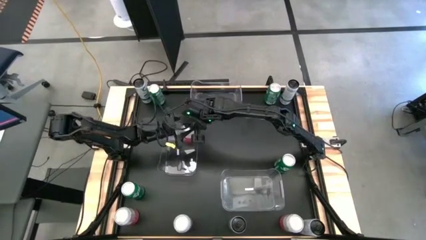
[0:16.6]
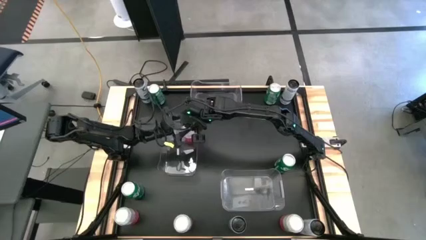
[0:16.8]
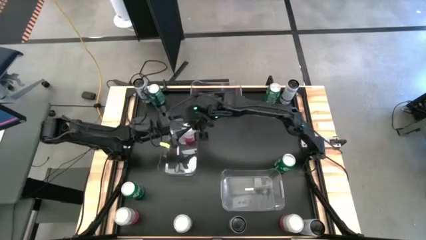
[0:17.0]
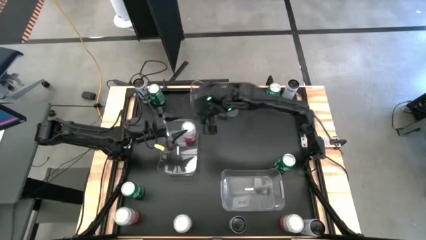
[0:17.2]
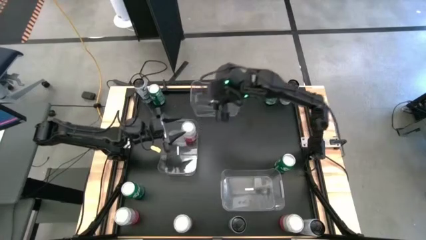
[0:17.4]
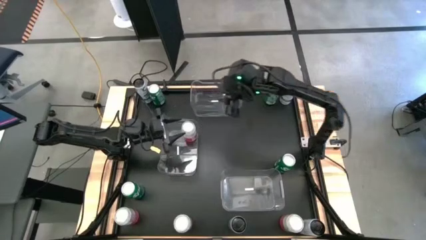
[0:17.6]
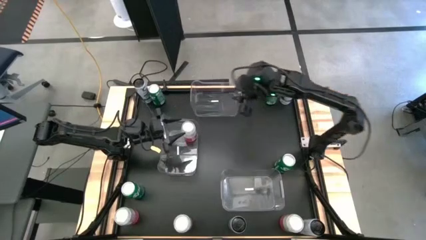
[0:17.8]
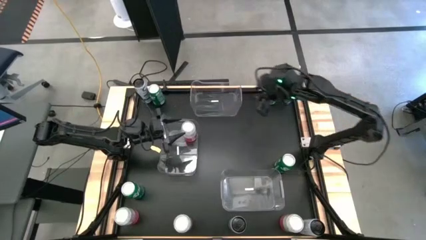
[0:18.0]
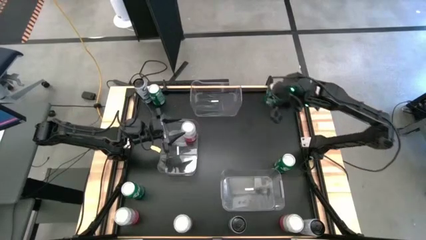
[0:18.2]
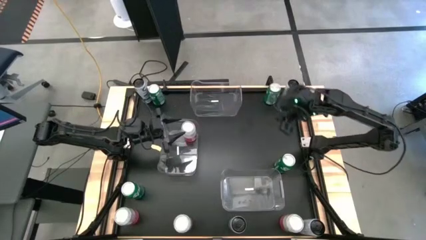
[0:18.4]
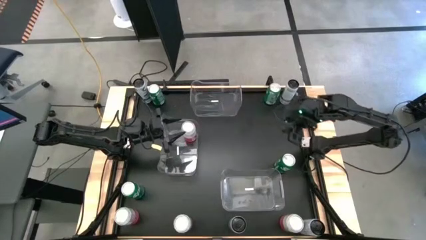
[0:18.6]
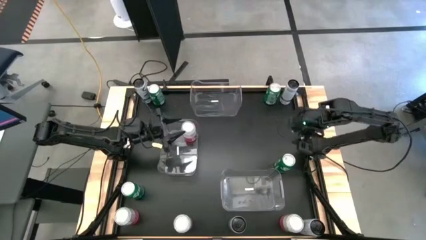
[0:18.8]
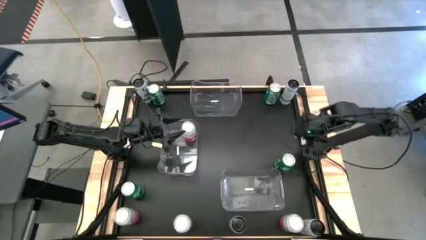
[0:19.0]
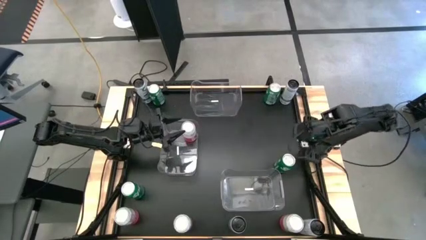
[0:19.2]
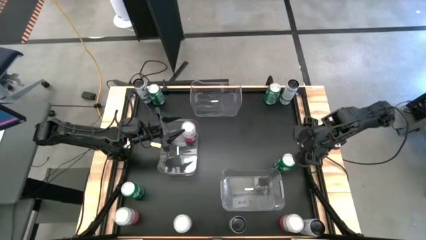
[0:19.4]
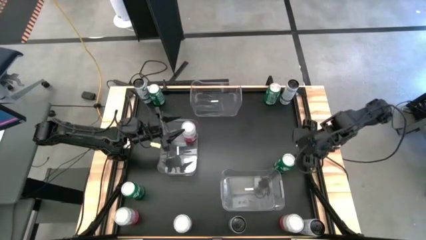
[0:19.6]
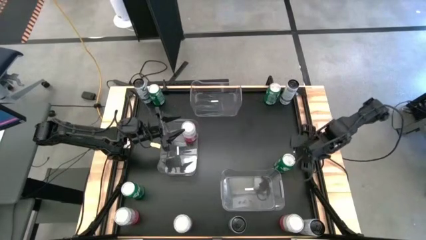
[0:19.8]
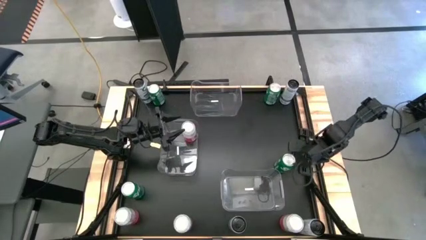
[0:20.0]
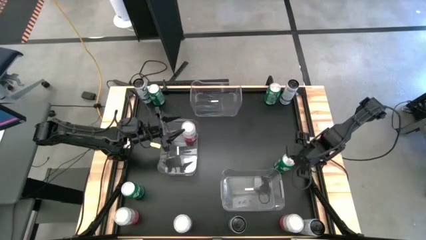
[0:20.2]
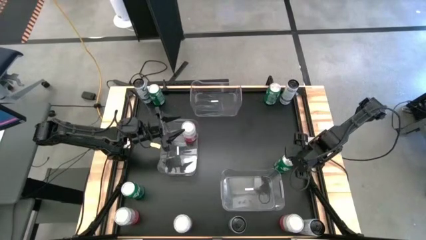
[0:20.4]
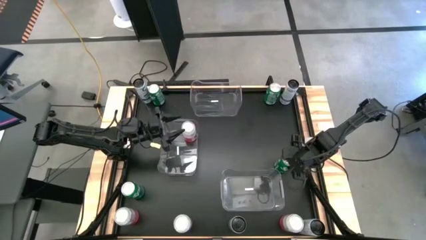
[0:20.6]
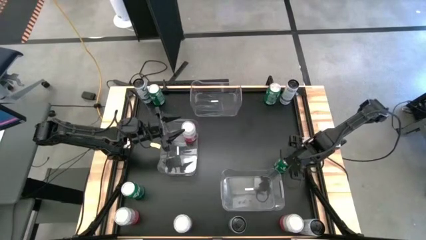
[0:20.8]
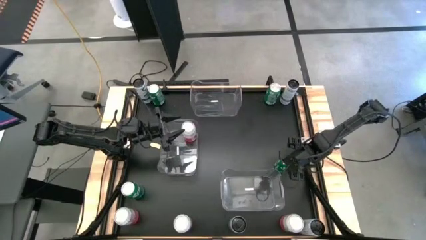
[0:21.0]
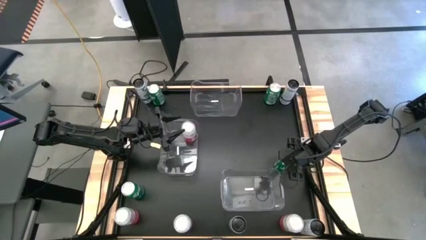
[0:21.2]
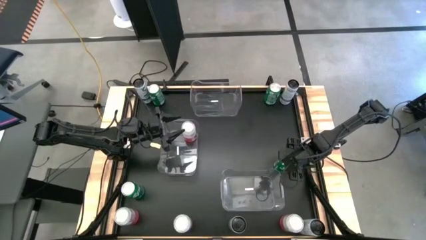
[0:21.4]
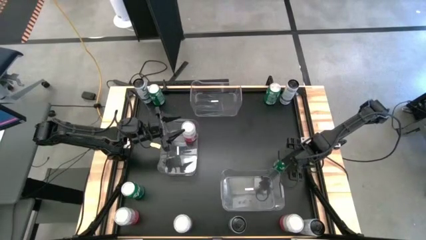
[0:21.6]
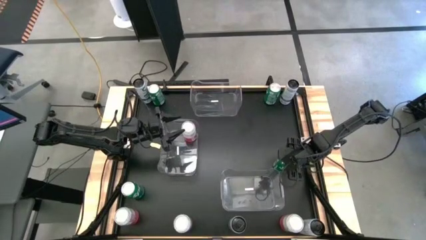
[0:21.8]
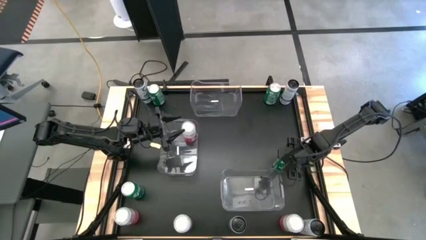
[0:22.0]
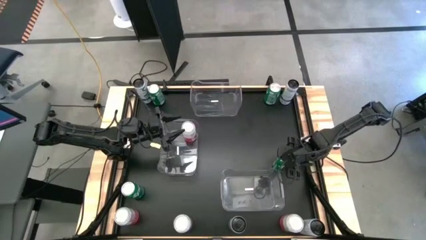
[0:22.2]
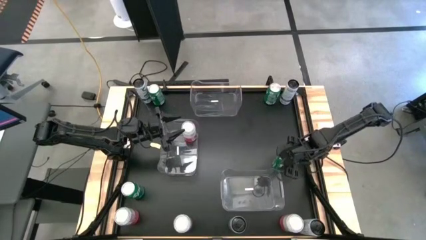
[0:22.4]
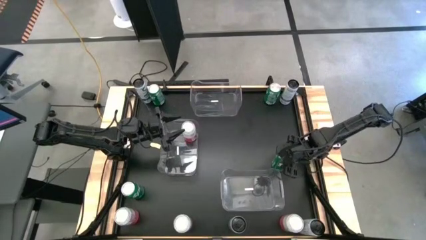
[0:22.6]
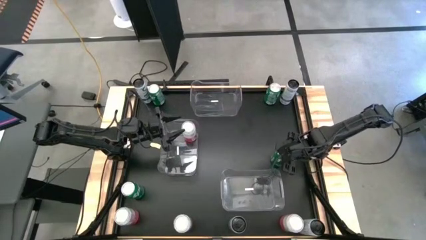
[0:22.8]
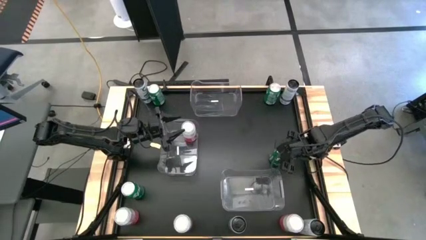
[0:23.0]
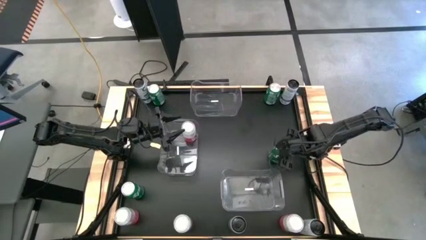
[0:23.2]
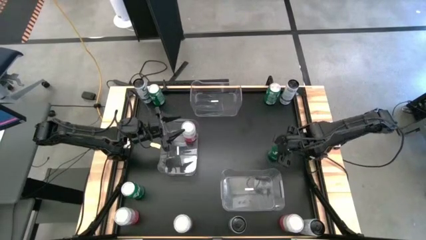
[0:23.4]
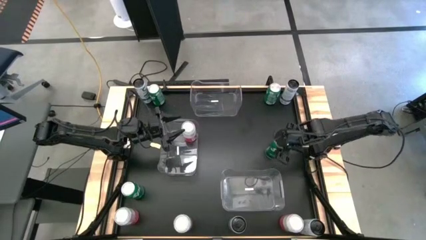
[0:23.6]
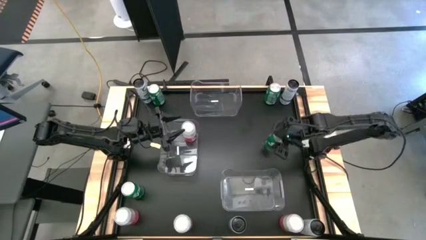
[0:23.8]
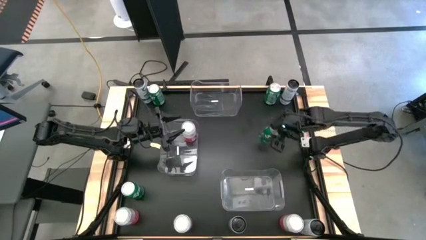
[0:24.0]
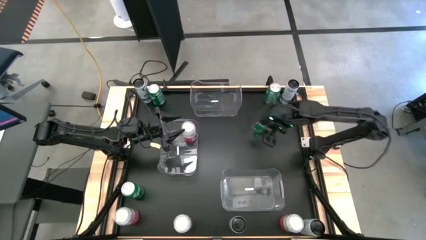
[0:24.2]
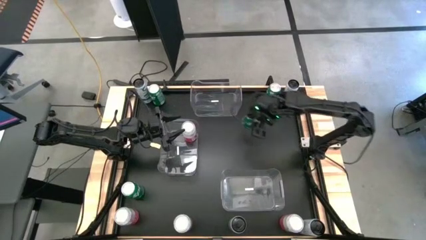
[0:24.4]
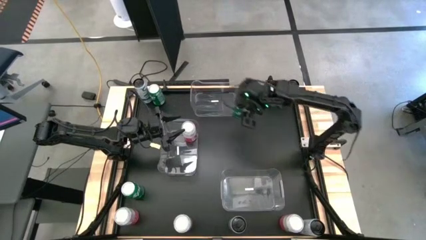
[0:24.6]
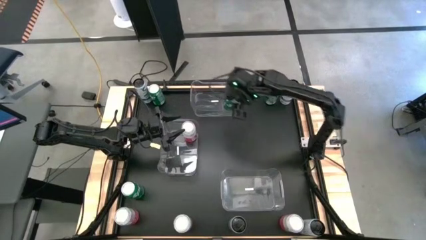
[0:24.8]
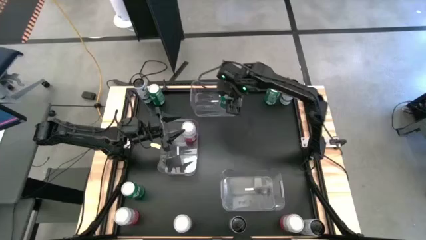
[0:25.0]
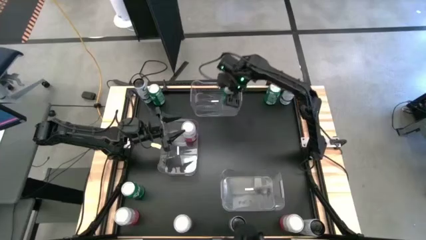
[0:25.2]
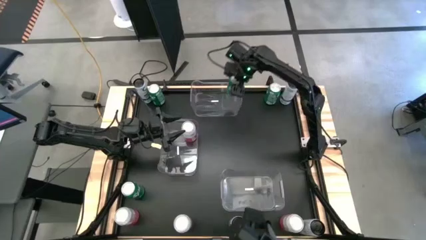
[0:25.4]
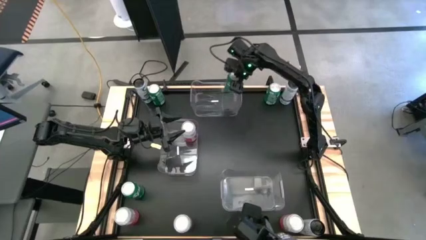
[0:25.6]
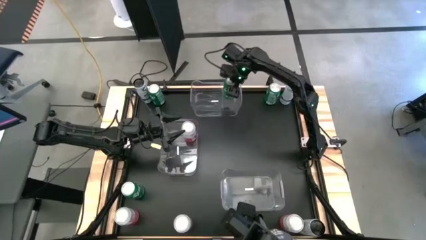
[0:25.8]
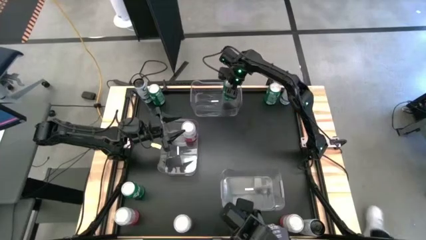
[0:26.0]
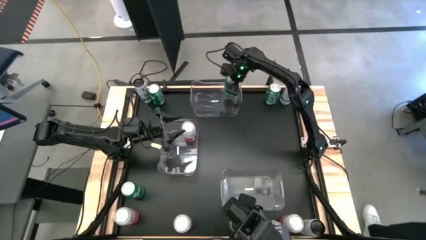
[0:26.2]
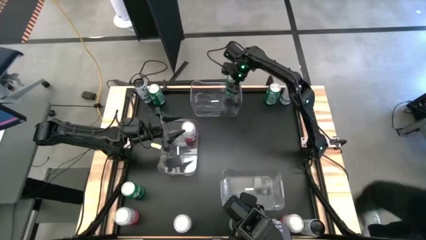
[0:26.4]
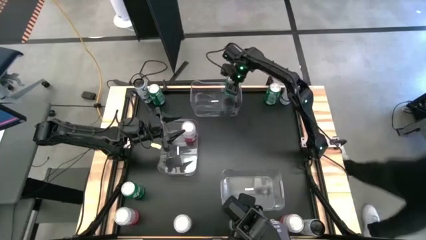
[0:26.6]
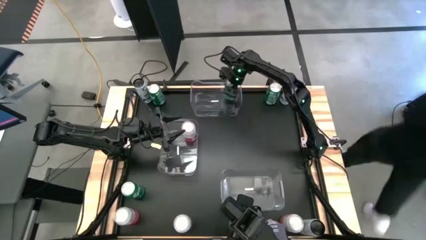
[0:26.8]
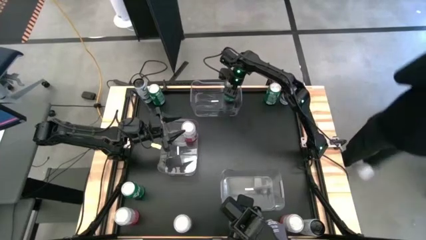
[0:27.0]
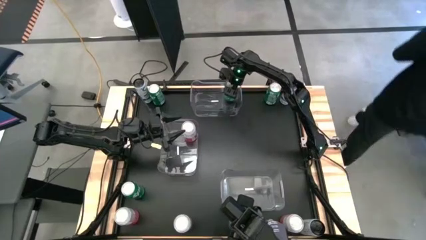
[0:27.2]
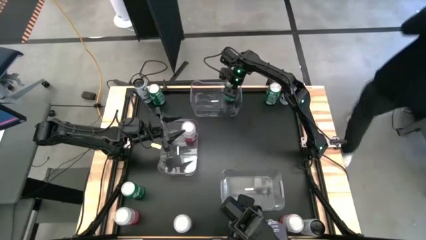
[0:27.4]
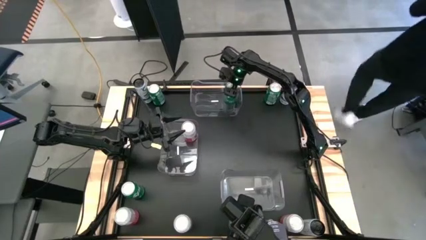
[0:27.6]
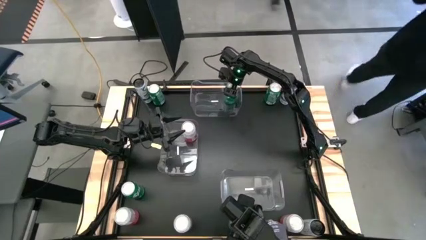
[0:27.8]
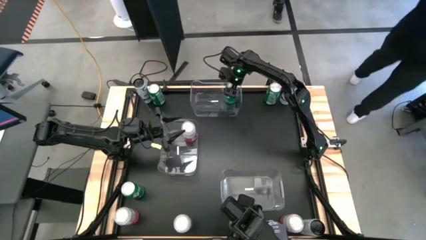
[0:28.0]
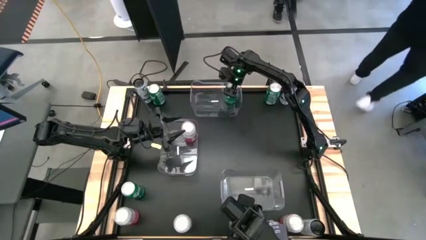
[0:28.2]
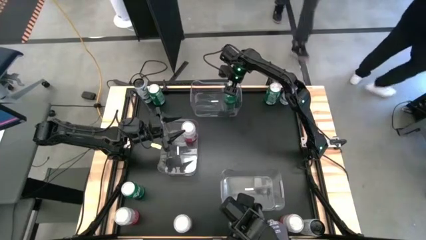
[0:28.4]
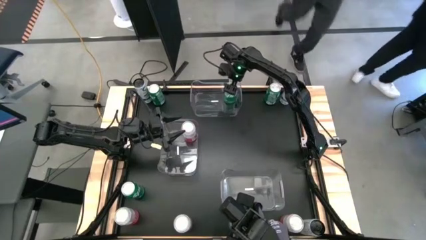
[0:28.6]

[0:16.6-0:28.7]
Task: Sort soda cans
Put the green soda can into the top transparent bin
